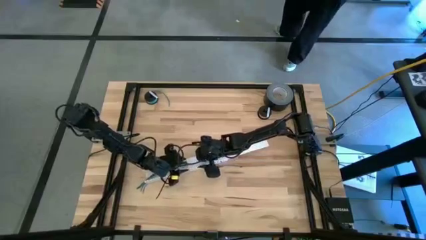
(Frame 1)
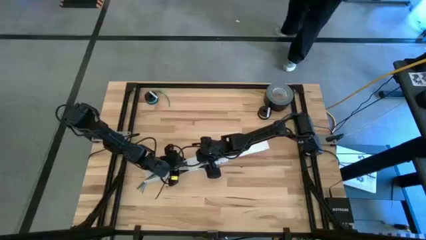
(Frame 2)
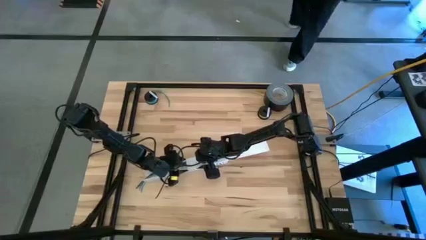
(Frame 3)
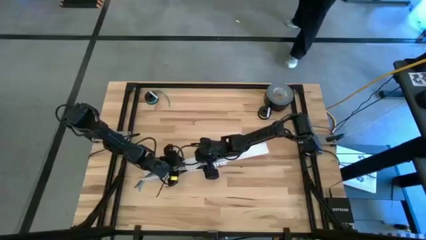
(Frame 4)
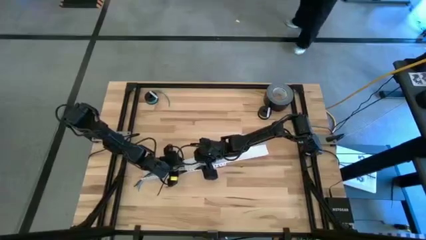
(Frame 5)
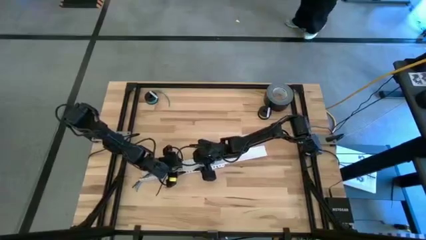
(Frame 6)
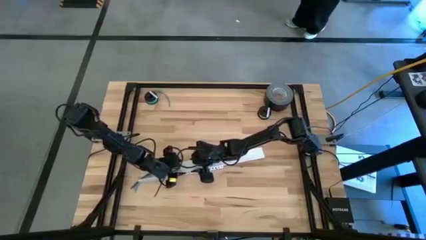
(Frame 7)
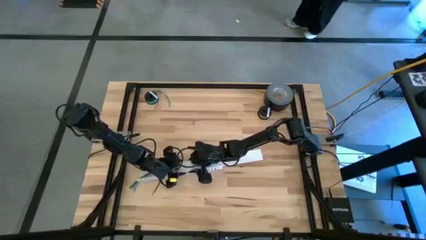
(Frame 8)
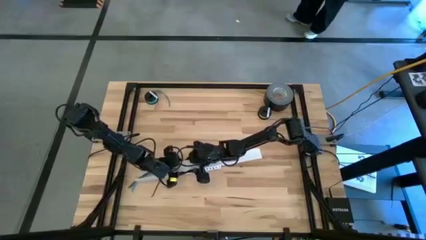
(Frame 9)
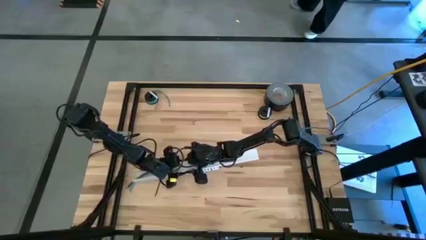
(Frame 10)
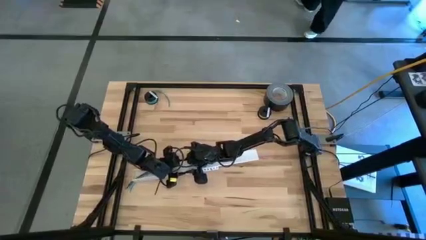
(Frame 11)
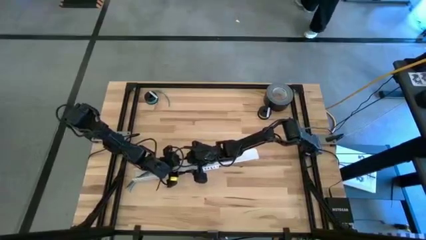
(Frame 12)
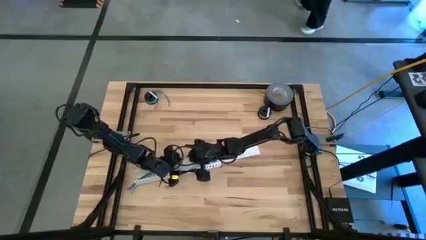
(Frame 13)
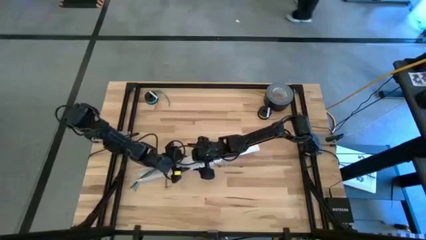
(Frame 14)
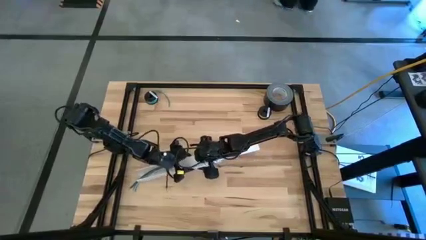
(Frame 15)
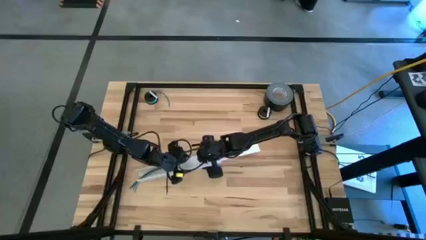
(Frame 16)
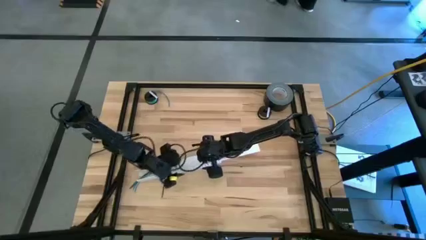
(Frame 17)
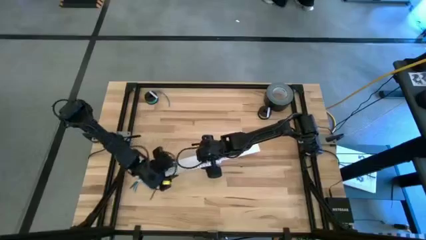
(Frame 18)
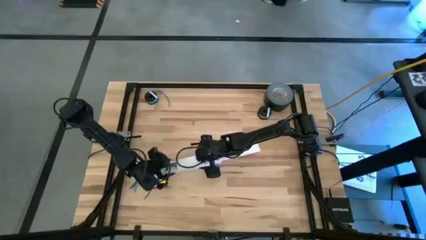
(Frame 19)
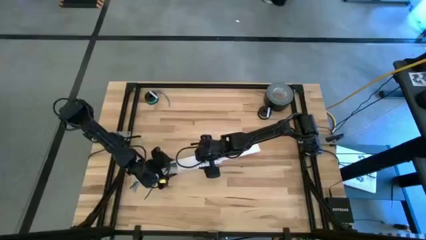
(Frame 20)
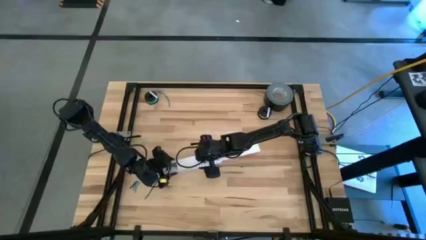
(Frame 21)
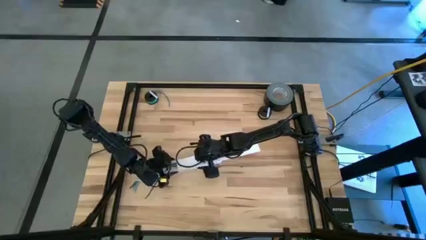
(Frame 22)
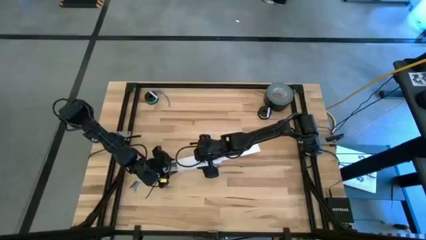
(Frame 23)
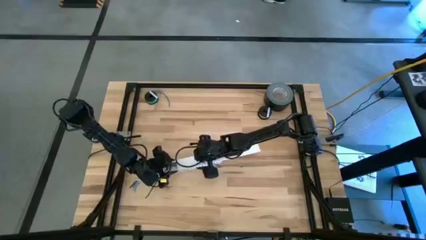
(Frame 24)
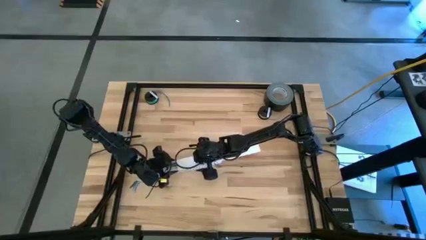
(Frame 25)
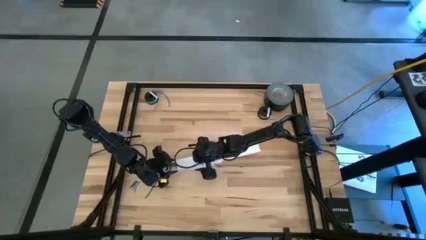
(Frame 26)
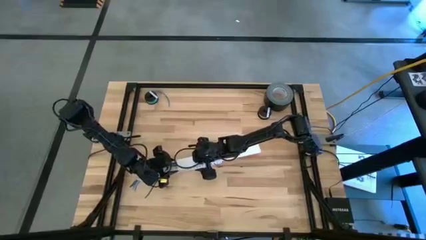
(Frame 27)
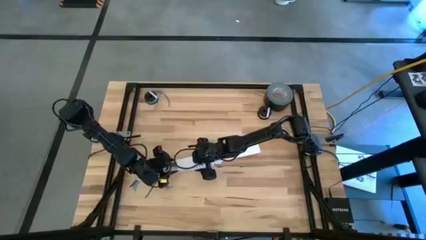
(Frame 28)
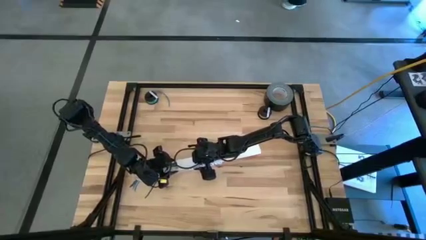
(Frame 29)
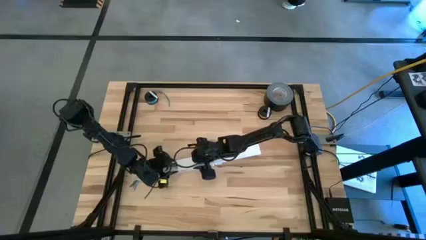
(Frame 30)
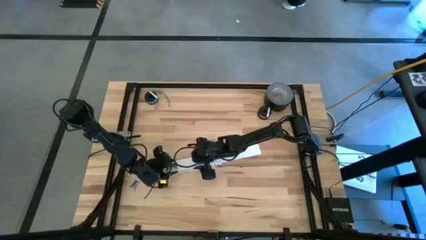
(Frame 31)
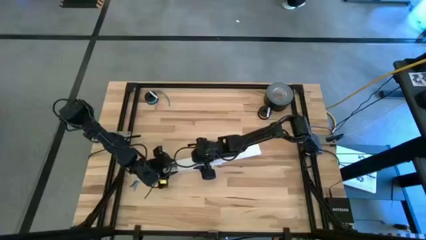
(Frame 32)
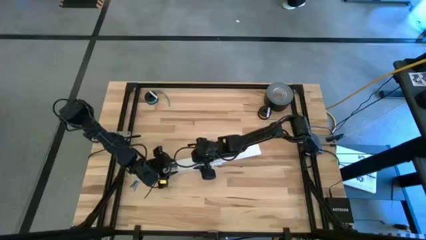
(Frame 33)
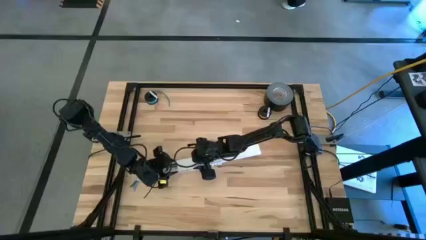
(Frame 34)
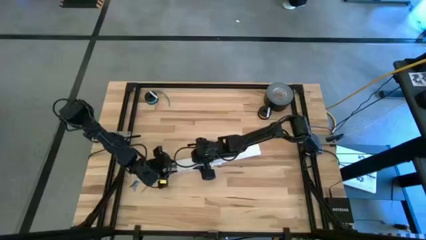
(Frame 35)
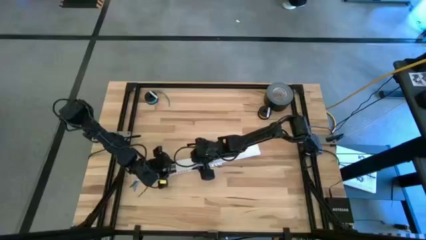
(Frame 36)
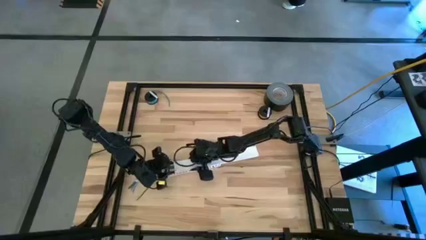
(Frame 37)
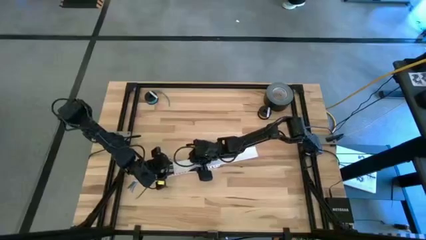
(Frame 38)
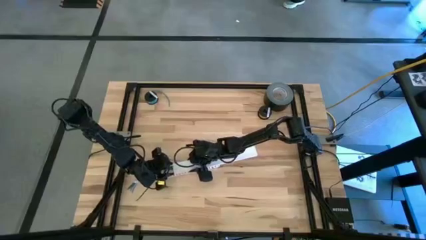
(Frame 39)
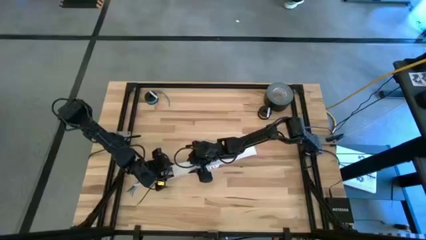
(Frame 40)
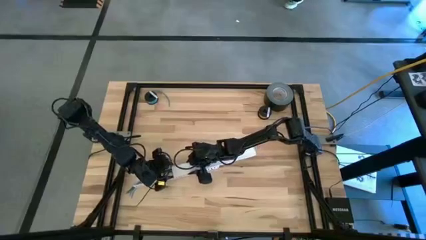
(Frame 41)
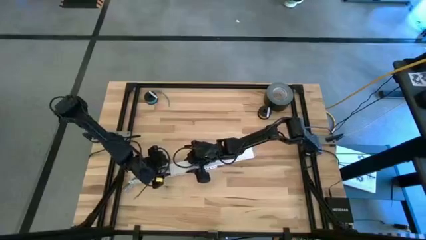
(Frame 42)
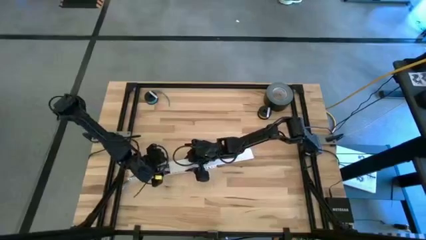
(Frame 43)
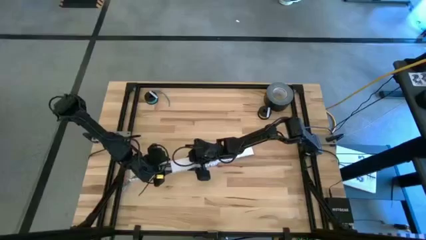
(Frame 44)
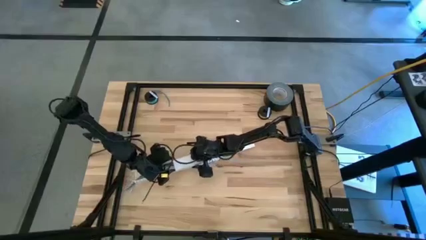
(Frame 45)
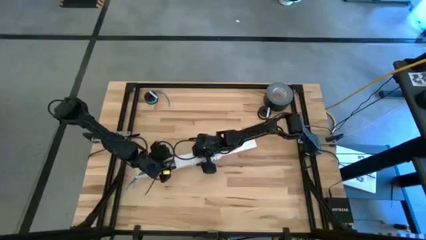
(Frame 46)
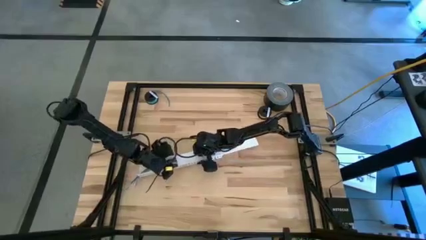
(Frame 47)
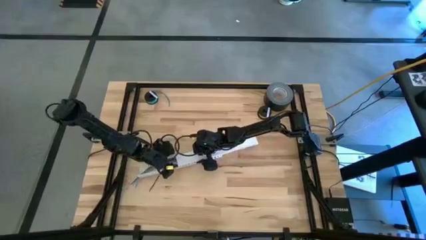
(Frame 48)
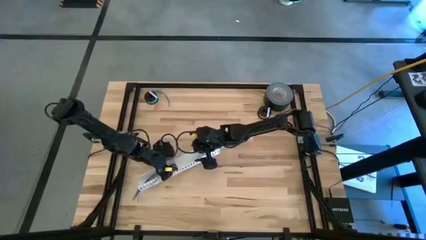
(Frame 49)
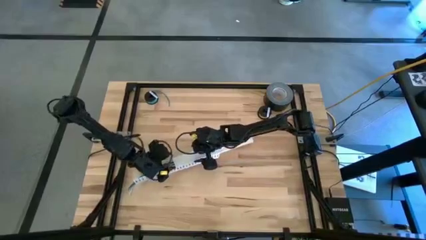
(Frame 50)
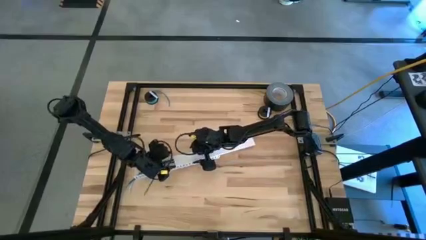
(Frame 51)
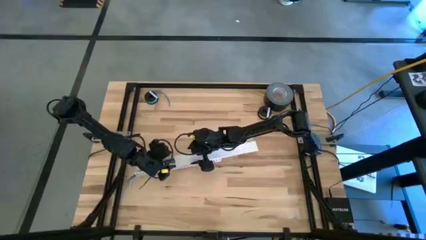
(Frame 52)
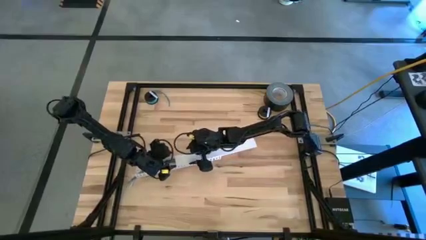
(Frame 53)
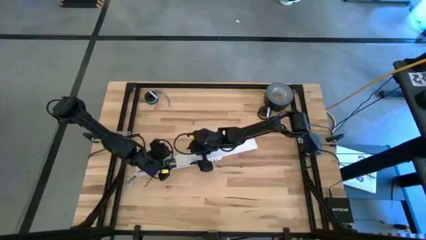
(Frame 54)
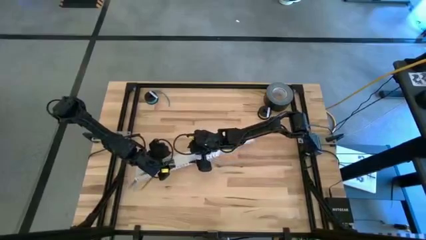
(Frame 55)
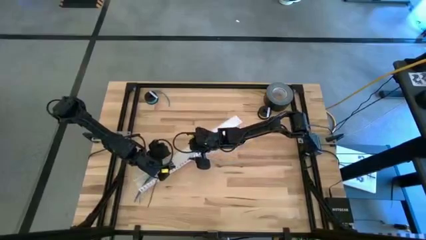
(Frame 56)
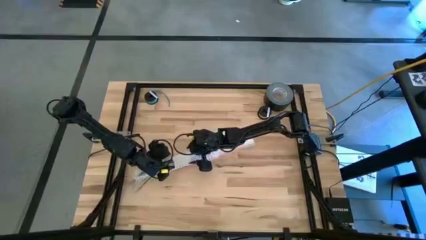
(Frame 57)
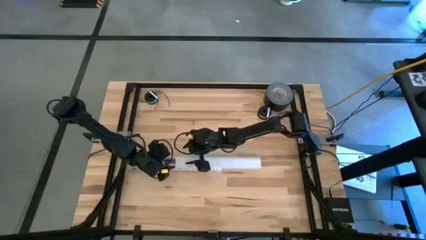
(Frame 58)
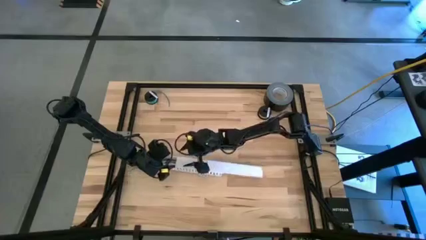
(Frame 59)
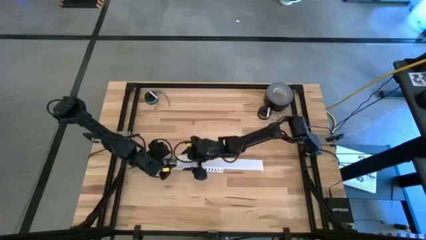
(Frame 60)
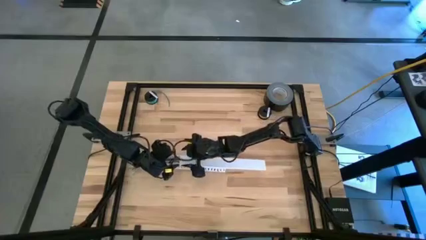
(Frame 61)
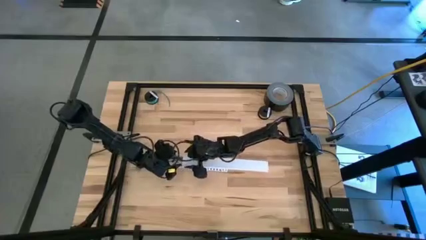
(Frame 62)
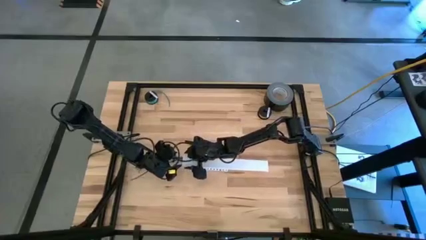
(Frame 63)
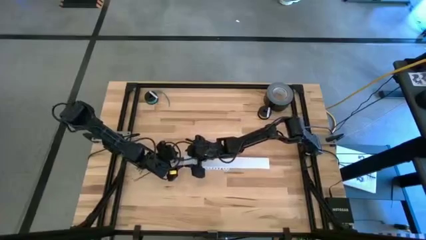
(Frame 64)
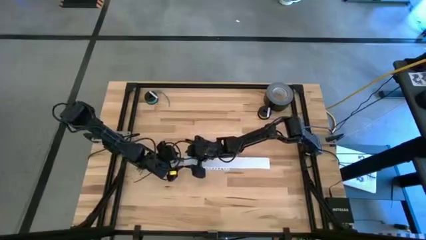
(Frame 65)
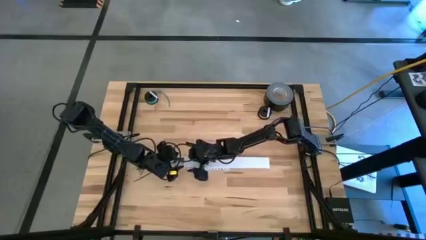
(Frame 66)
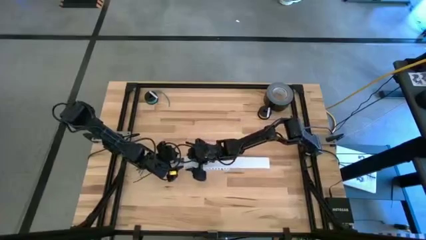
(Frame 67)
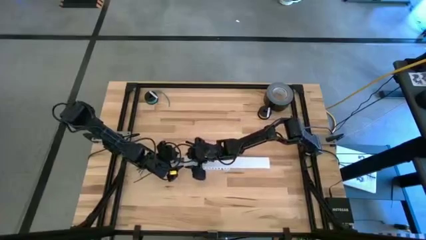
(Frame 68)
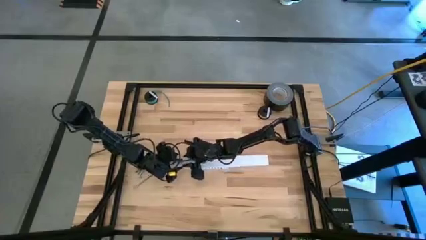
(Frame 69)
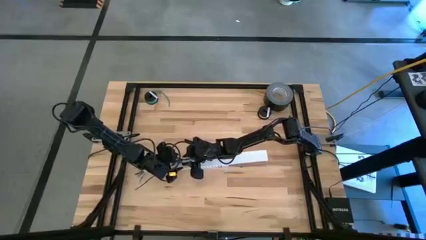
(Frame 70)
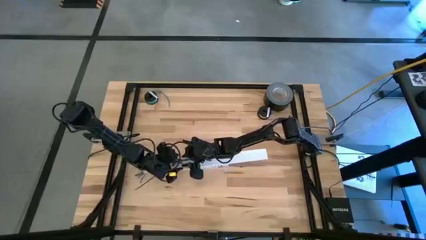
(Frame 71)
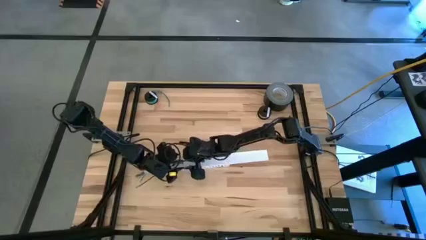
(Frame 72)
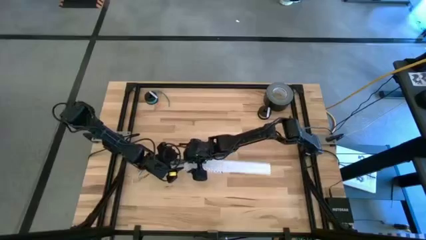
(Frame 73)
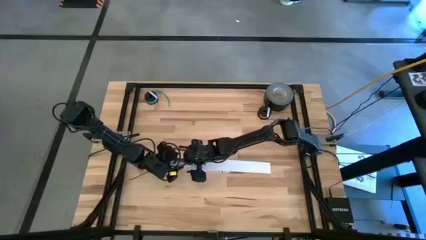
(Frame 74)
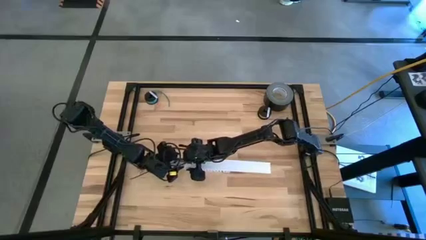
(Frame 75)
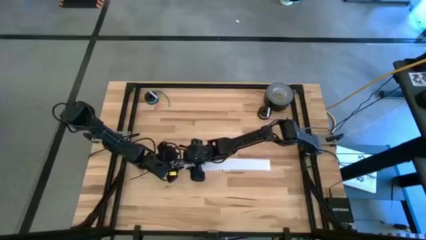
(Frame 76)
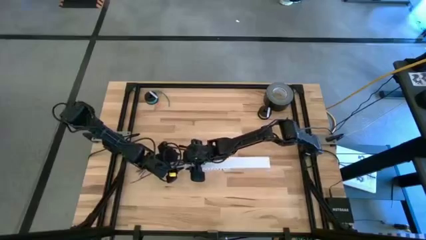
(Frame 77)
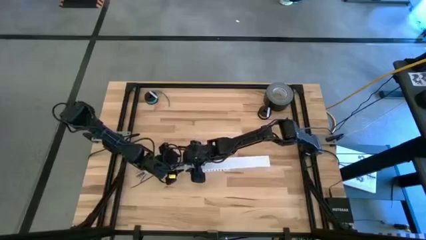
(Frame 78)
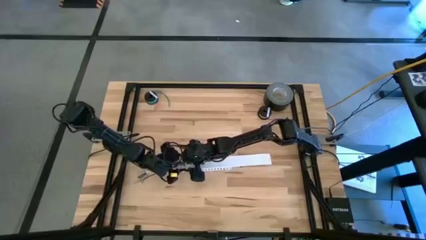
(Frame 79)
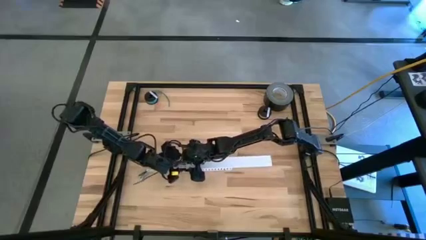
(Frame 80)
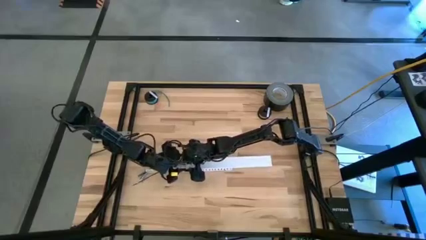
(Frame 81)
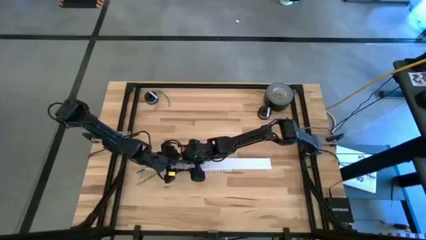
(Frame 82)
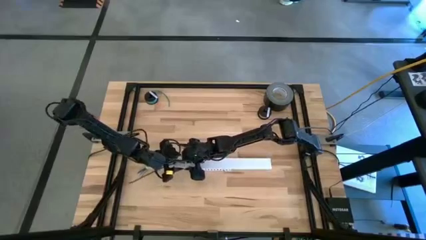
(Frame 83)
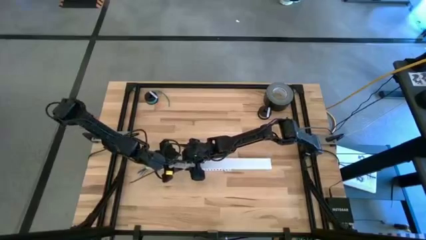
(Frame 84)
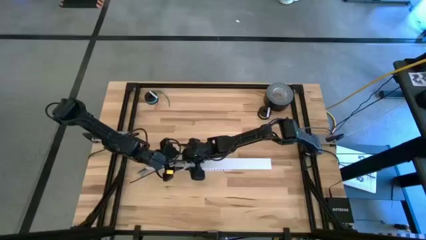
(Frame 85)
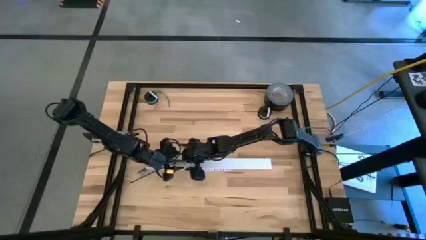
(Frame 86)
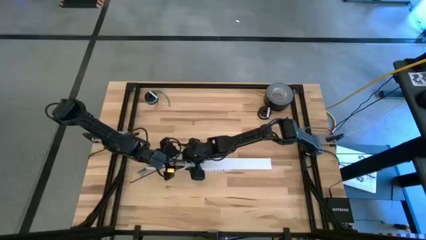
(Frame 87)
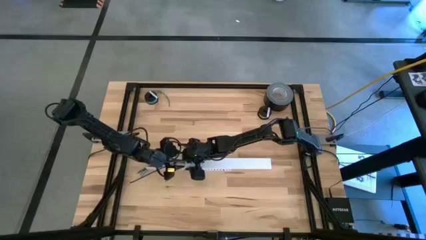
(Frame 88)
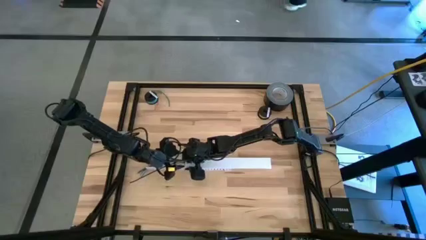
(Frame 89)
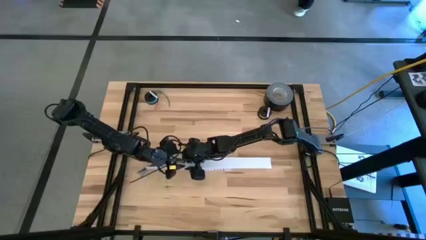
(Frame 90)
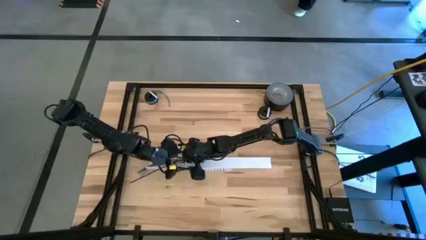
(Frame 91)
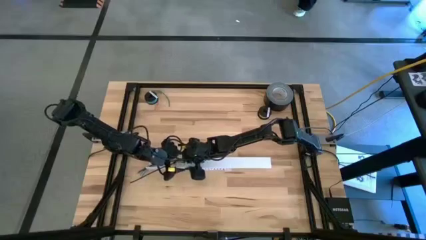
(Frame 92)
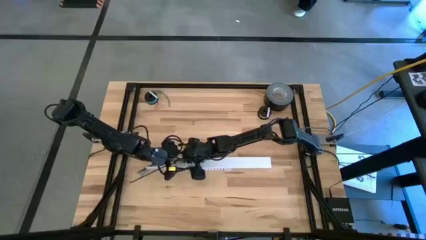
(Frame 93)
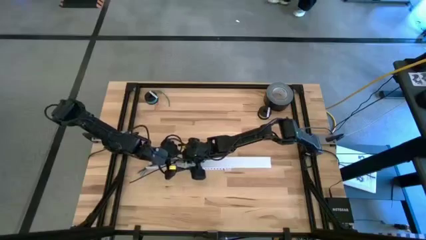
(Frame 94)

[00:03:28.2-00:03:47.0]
Task: Ziptie cables
Close the white cable duct
